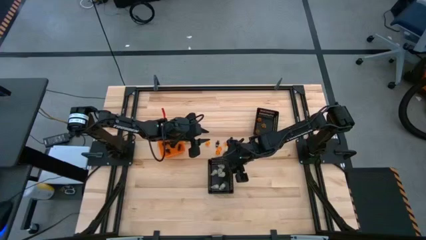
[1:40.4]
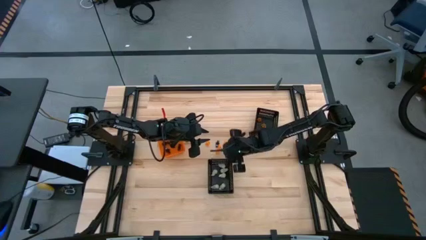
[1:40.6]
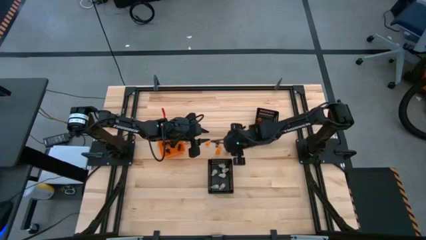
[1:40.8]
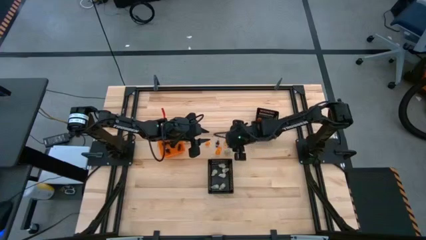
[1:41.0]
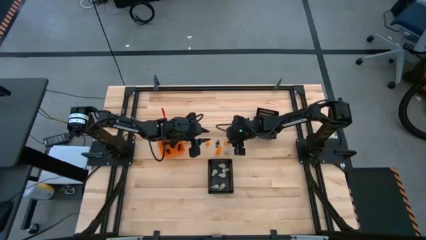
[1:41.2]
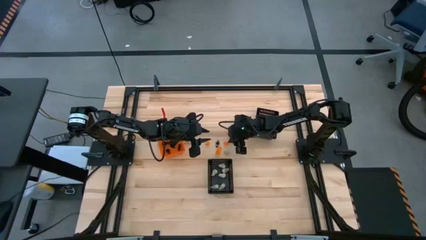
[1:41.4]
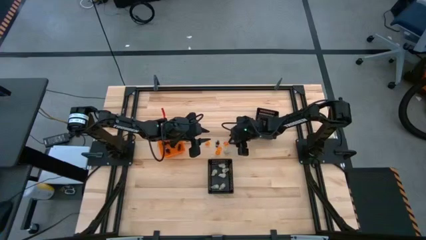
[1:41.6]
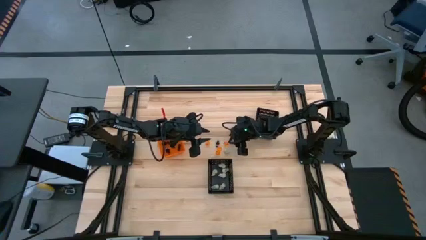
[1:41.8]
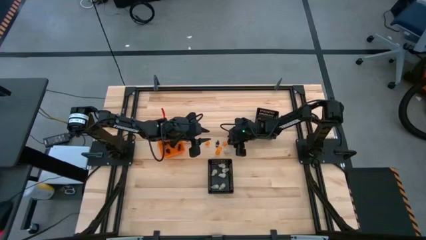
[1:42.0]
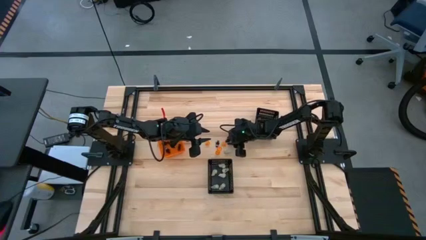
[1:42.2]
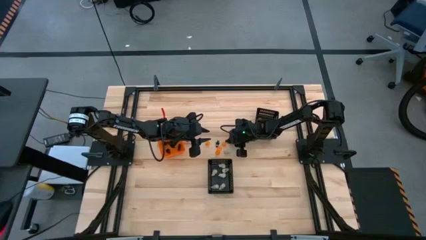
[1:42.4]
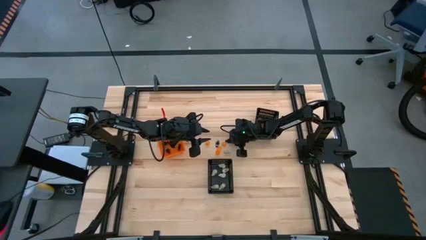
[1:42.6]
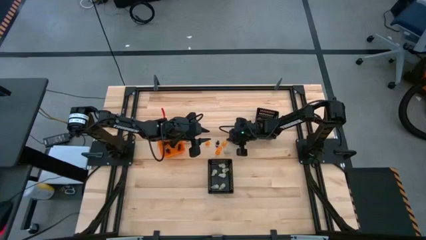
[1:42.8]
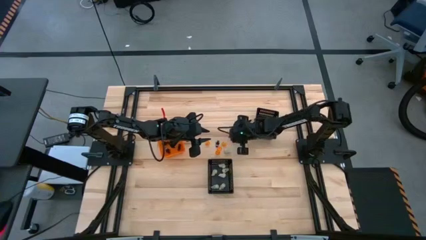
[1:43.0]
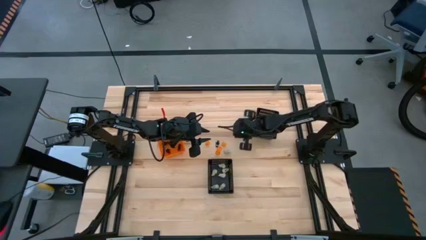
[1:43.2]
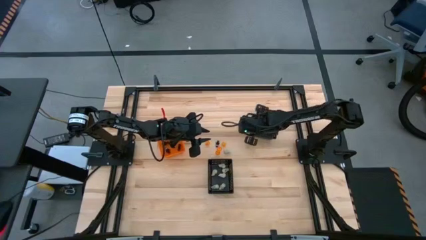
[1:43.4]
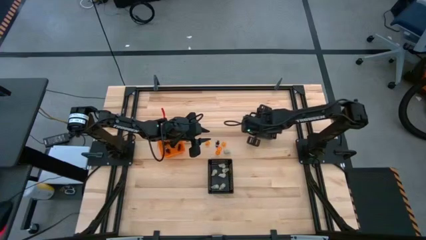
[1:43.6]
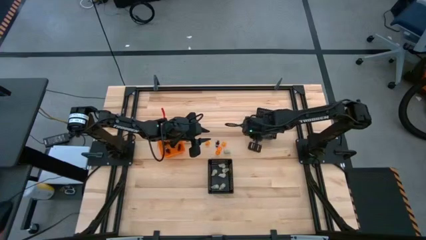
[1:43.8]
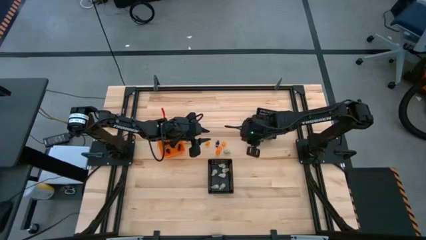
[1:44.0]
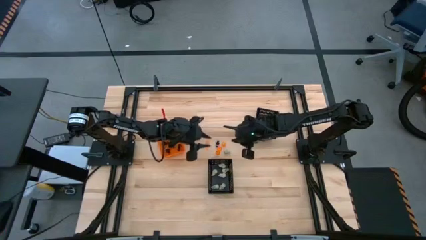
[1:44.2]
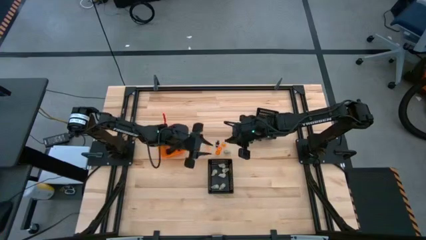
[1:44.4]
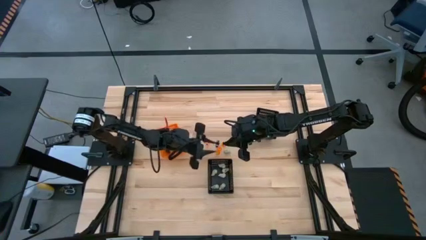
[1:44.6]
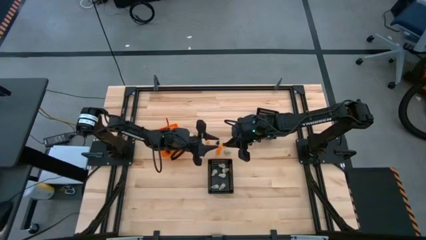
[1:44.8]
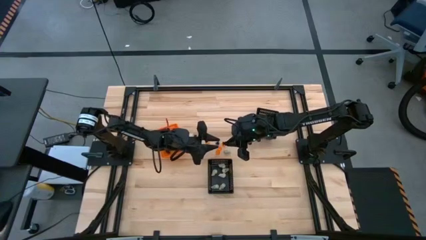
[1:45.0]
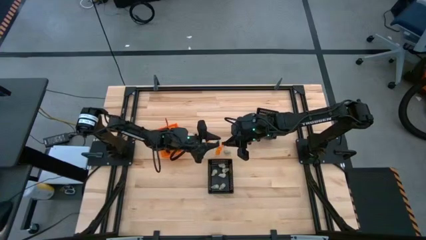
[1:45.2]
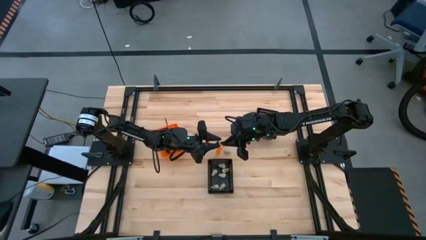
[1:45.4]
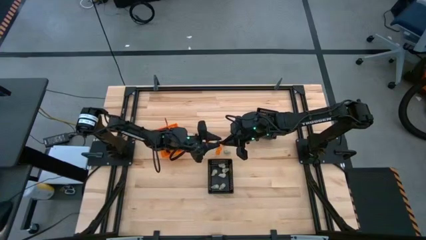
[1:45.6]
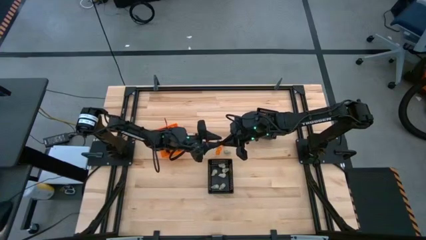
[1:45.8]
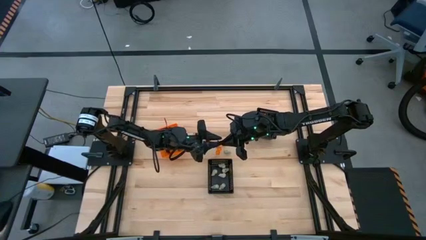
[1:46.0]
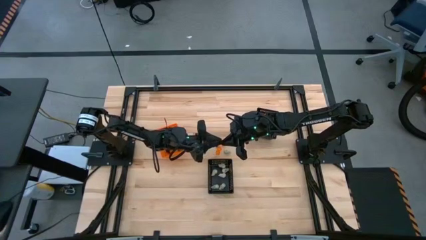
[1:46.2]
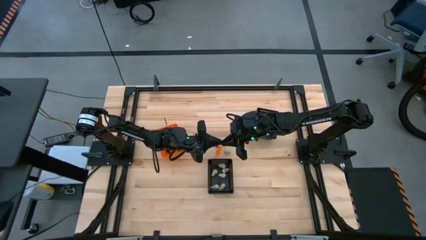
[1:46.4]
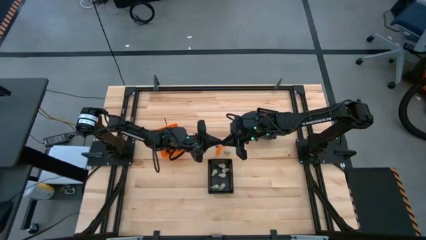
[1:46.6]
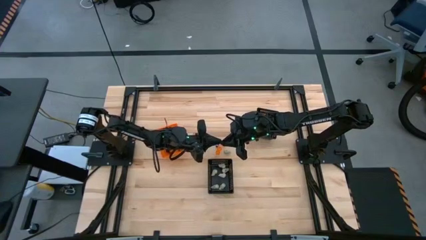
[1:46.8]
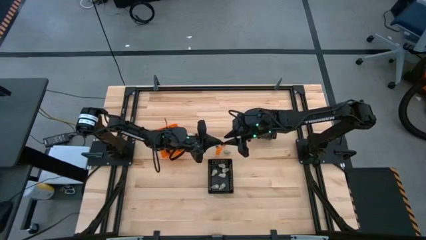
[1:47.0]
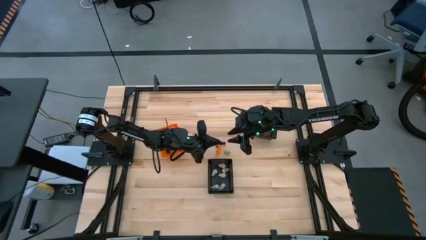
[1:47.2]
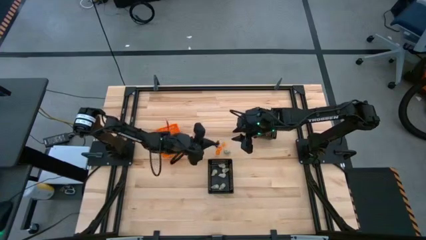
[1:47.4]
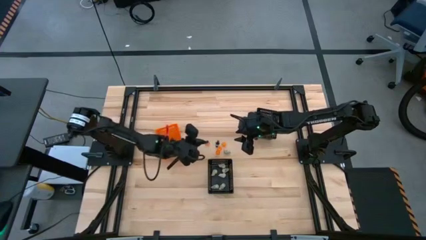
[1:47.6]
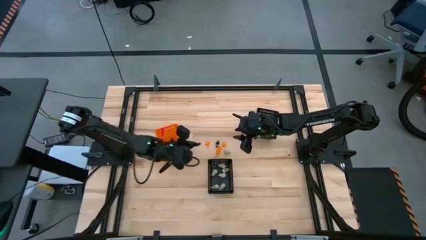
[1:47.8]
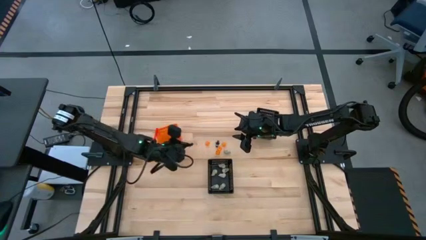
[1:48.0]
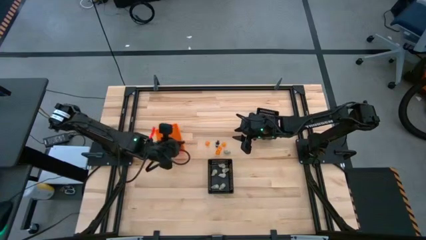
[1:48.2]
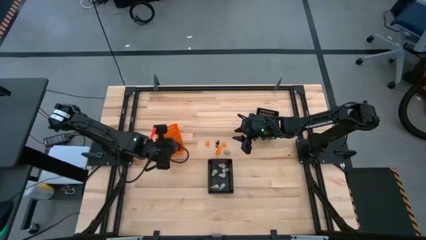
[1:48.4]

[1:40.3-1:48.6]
Task: Sort Halloween decoration
Put the black skeleton toy into the orange bin

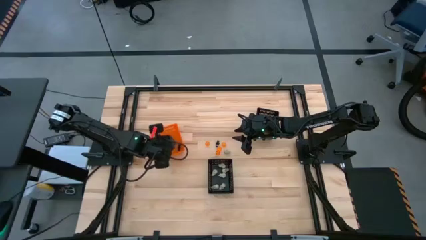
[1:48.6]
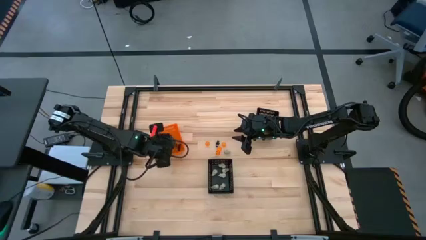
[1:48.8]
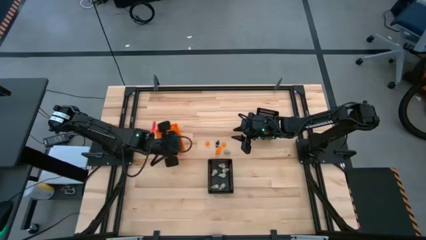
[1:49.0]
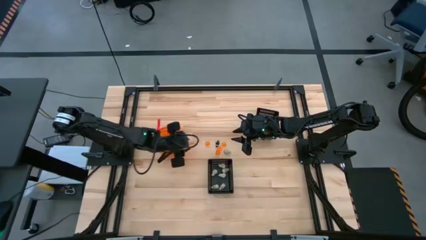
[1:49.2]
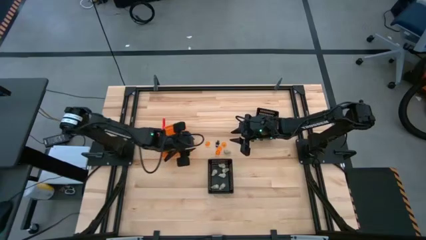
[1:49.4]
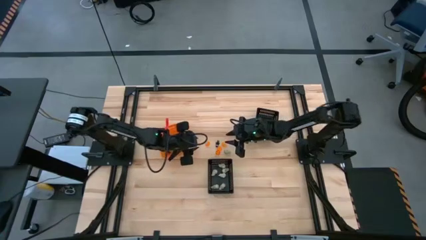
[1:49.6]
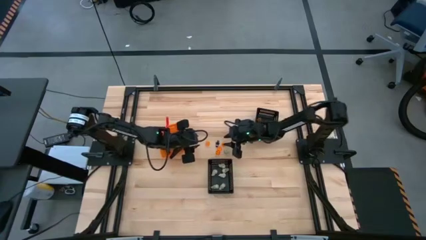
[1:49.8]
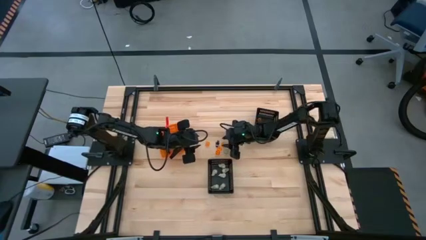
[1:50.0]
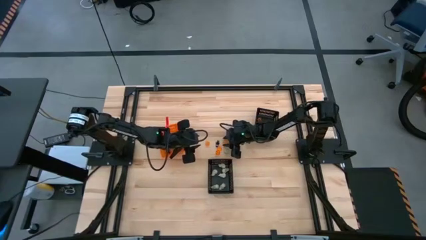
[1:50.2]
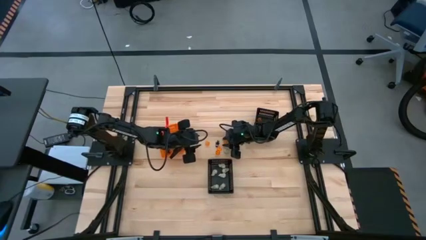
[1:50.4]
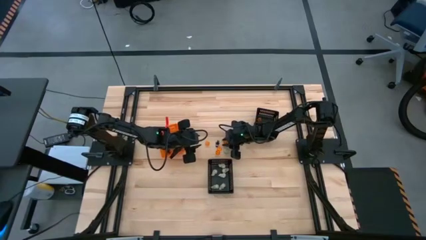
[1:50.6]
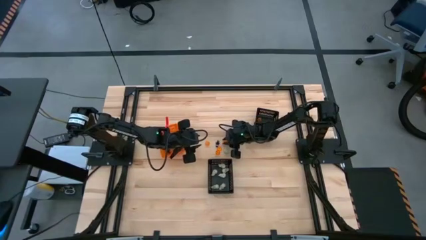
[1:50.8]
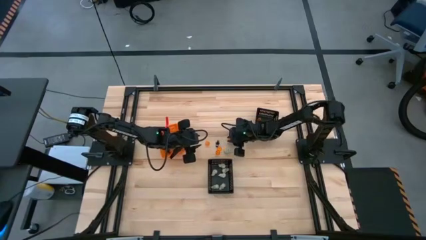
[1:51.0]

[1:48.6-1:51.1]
Put the orange pumpkin toy into the top black bin

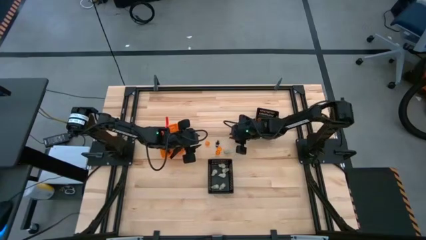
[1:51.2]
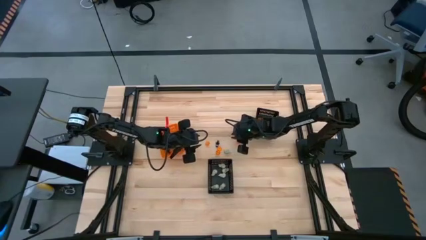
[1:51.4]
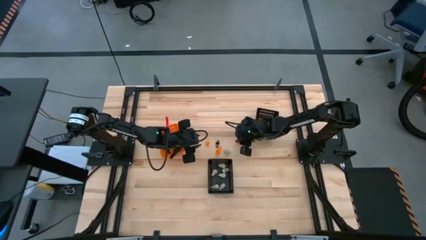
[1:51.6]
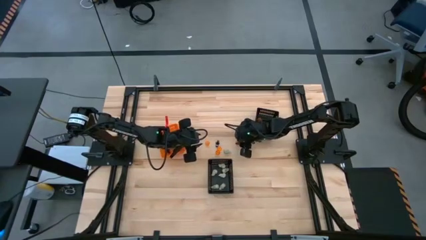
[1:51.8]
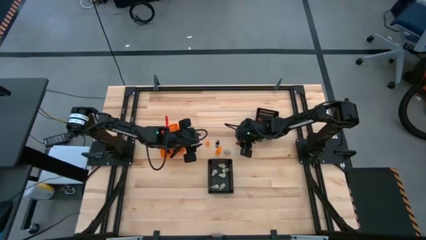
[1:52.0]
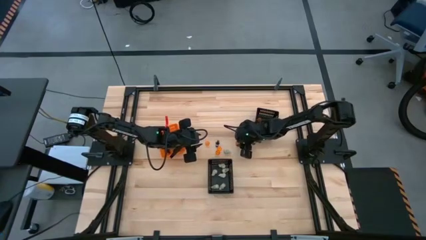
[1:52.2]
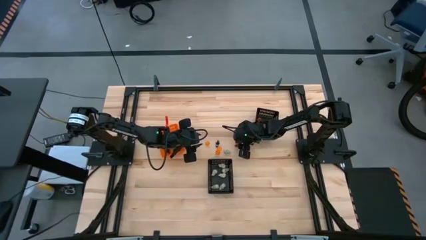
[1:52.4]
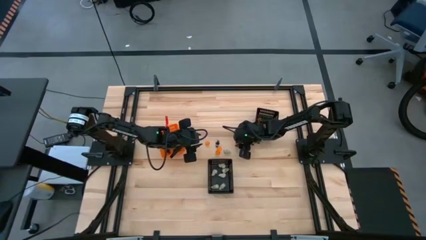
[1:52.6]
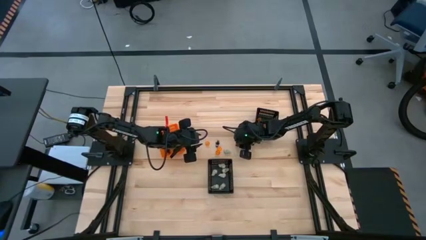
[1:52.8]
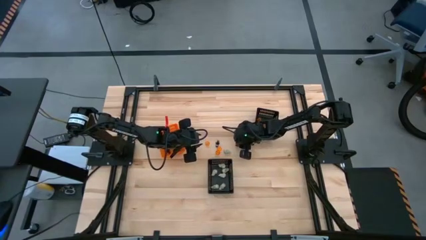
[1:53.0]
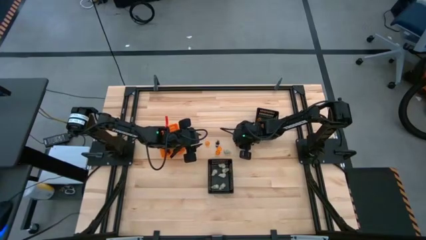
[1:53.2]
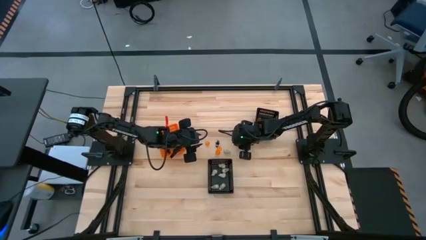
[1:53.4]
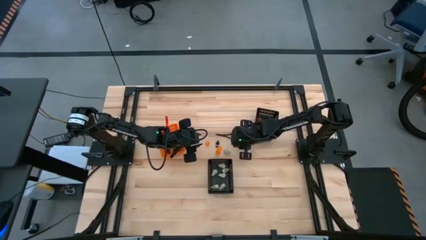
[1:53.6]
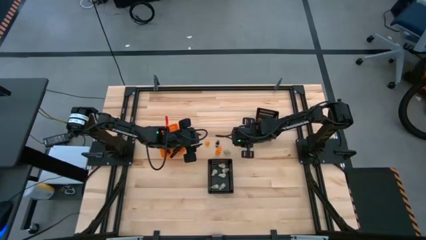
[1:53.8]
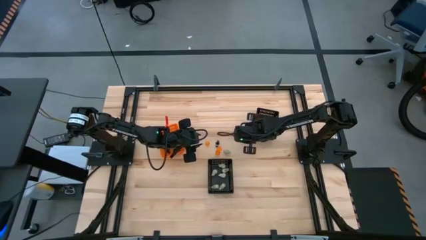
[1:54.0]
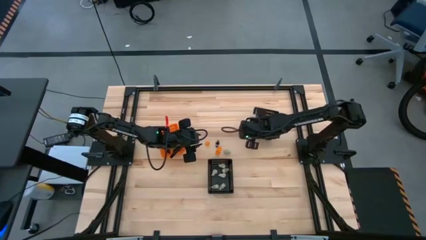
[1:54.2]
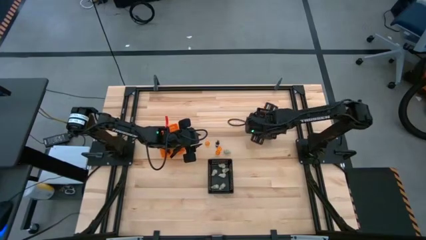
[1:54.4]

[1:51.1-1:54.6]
Put the orange pumpkin toy into the top black bin

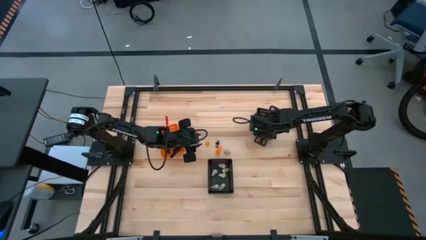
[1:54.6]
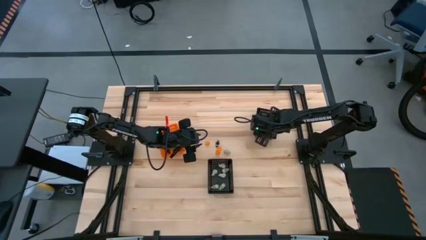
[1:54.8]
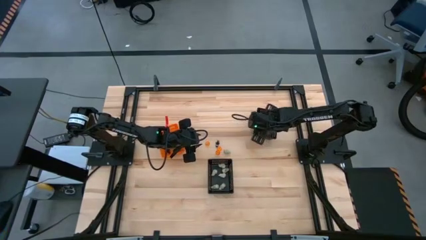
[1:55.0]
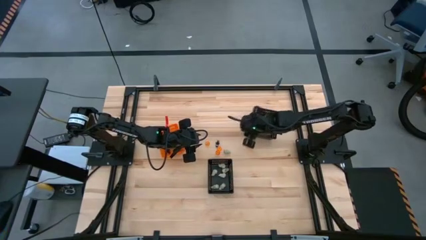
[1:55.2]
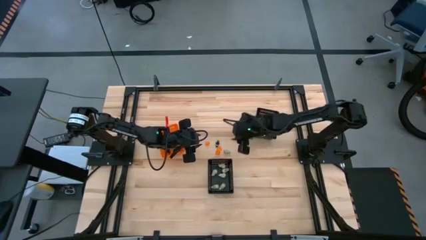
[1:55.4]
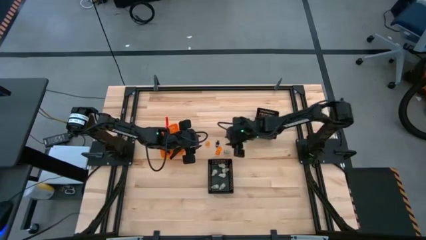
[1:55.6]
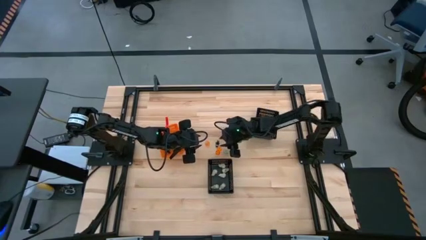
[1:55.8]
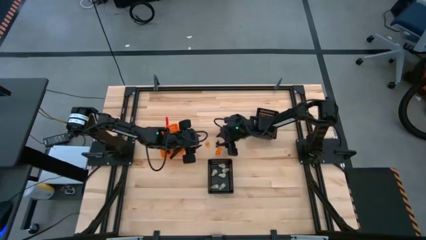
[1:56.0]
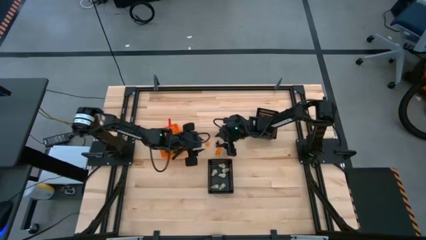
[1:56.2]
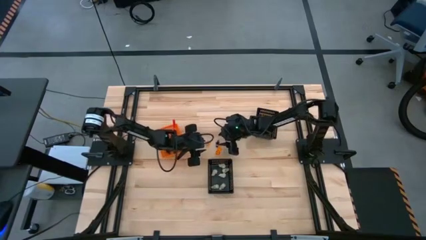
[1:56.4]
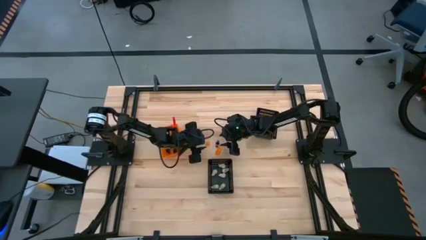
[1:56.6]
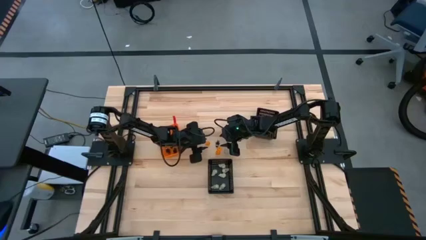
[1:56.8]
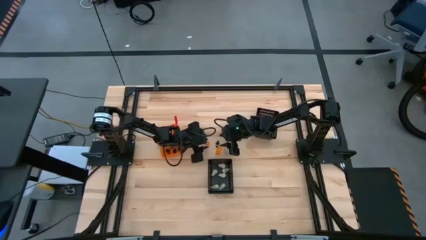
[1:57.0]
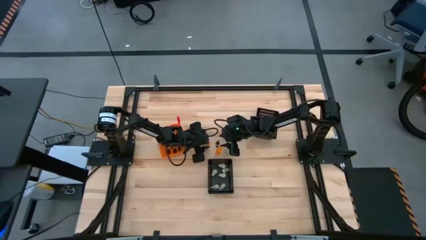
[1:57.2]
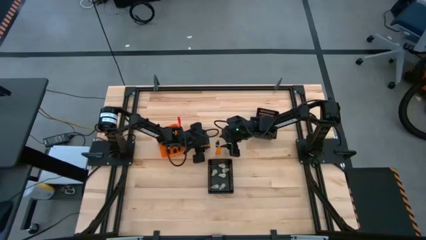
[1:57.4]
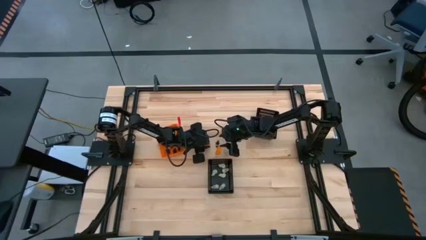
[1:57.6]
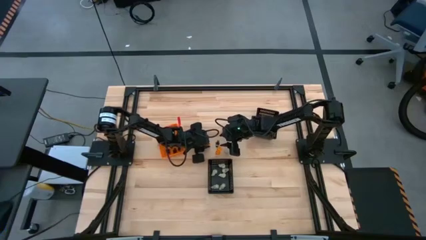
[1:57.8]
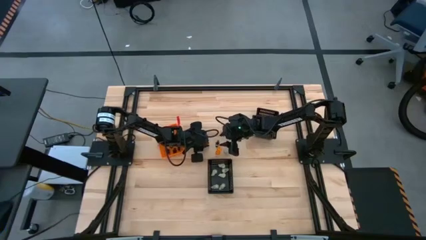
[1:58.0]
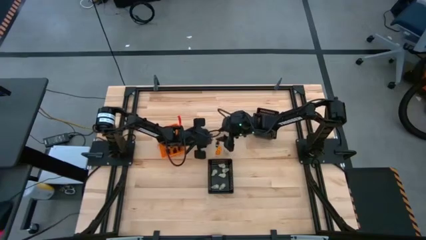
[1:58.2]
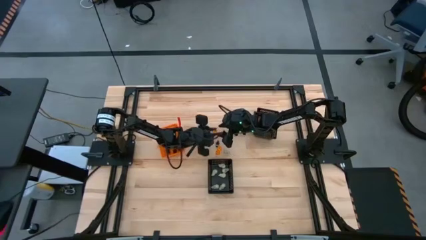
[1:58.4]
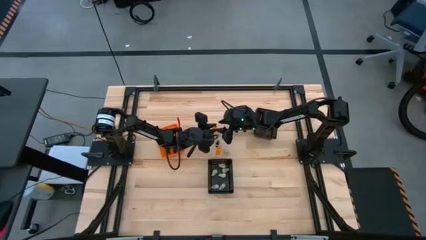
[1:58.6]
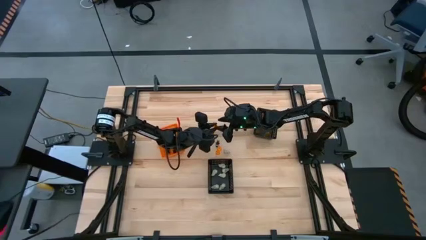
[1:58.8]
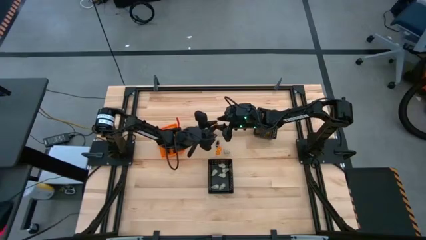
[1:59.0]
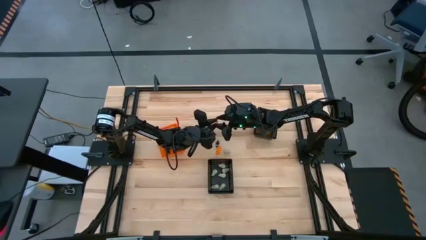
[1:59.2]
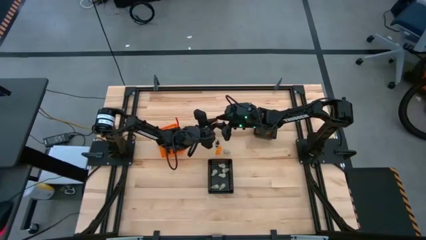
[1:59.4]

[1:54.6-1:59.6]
Put the orange pumpkin toy into the top black bin
